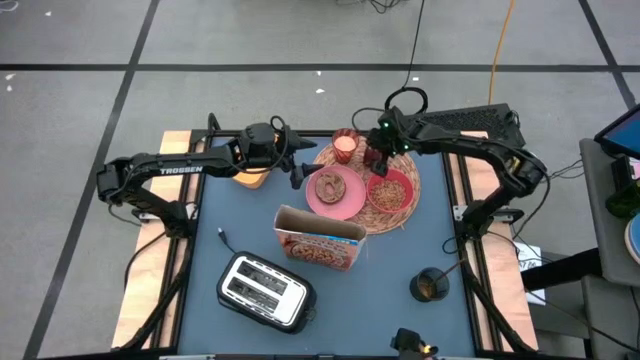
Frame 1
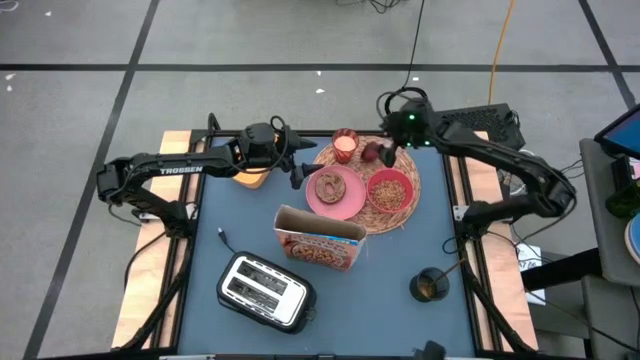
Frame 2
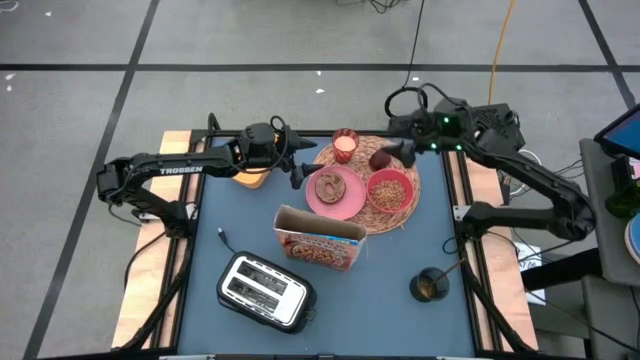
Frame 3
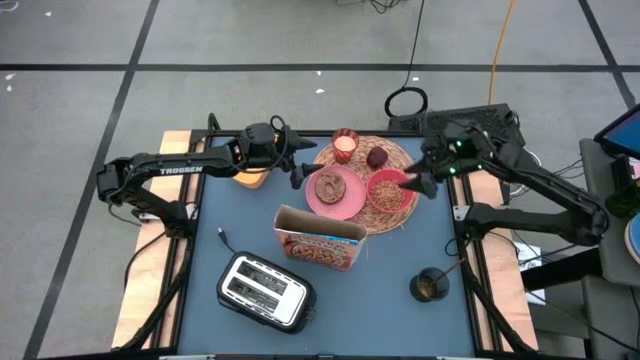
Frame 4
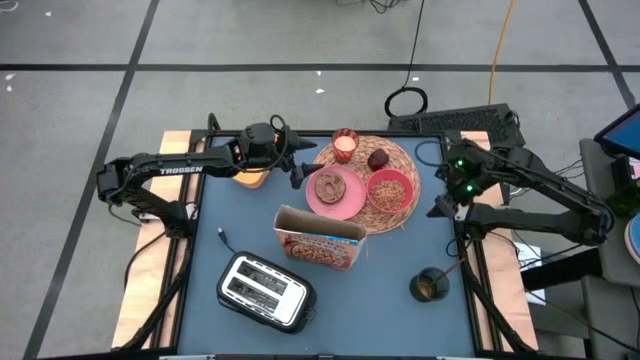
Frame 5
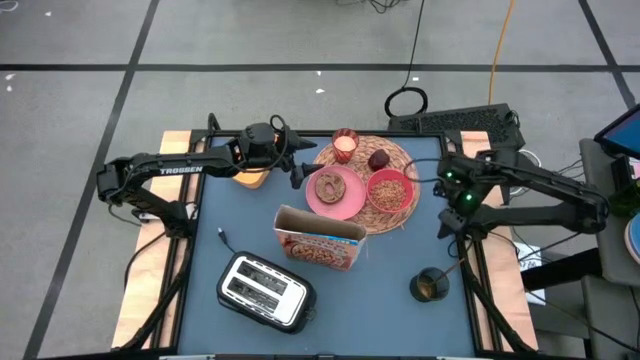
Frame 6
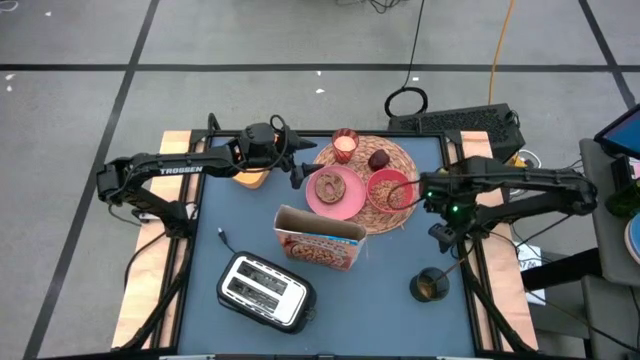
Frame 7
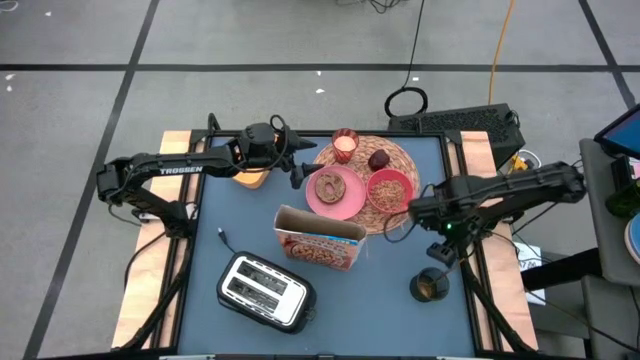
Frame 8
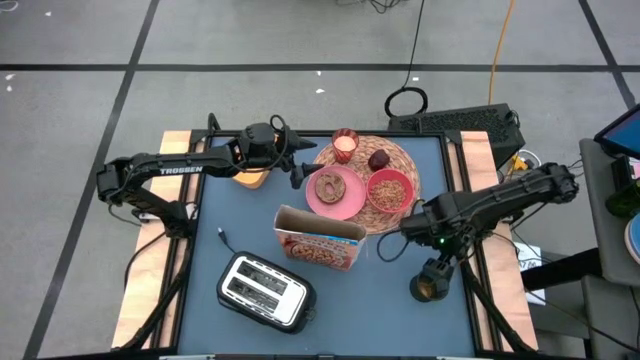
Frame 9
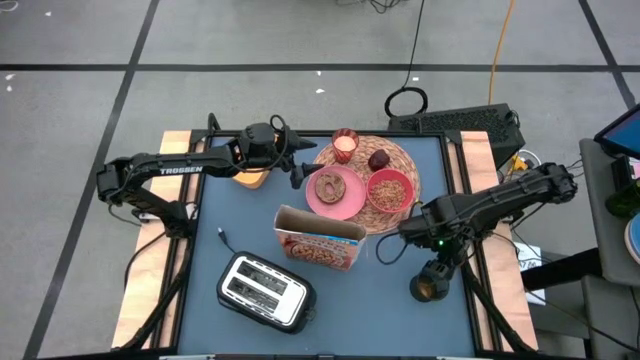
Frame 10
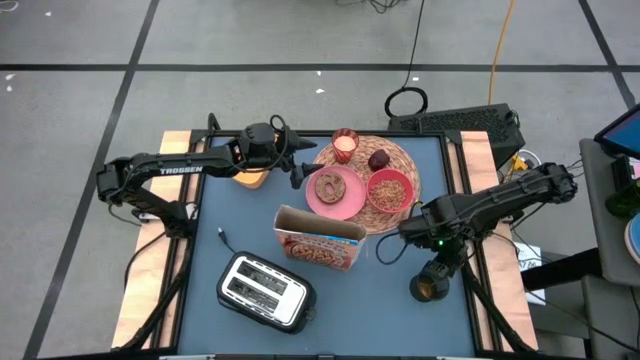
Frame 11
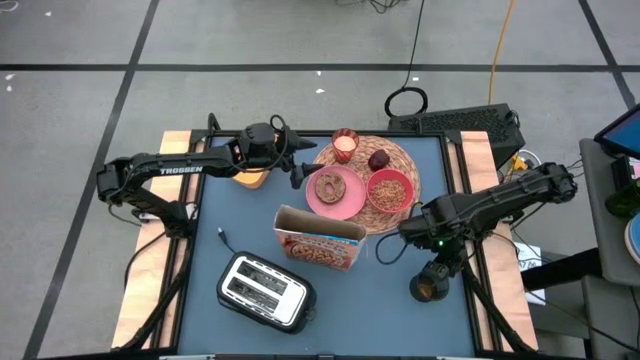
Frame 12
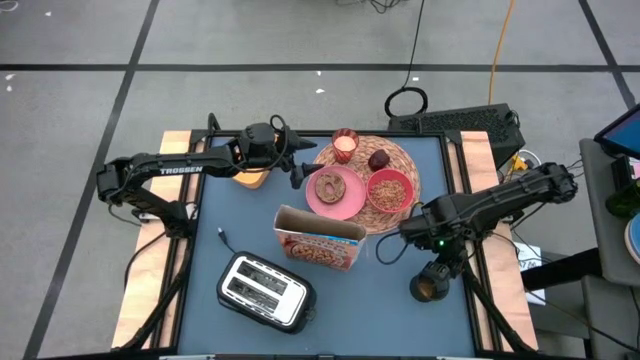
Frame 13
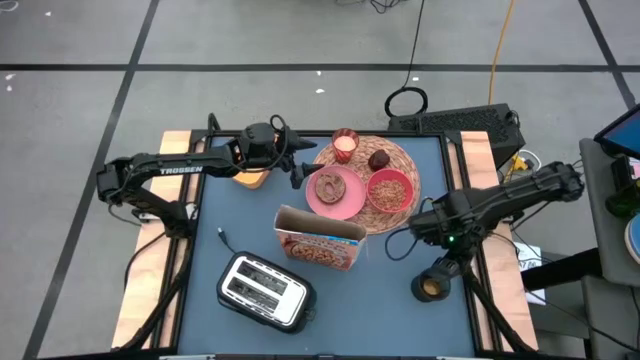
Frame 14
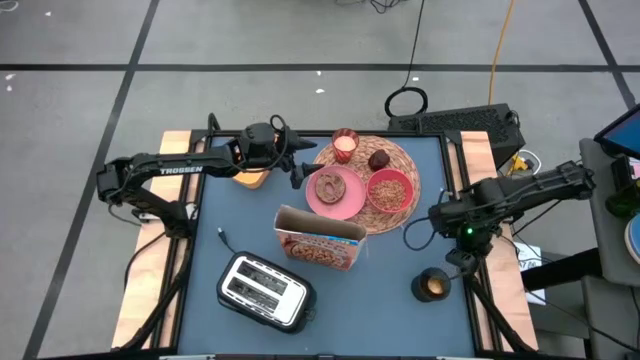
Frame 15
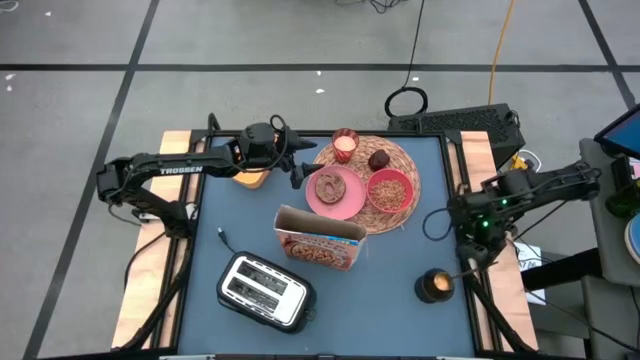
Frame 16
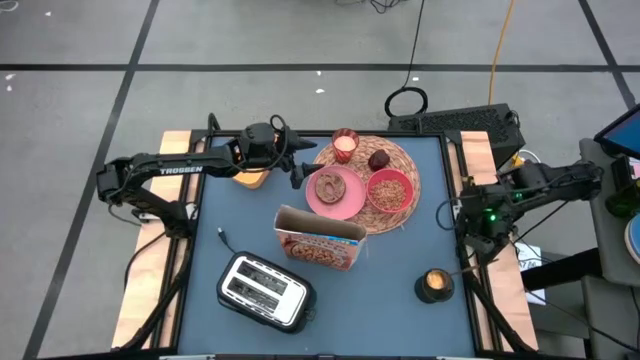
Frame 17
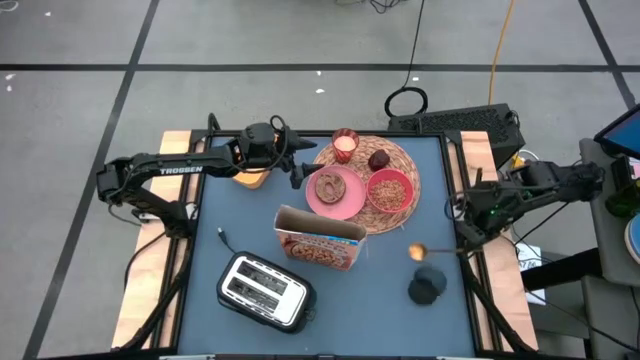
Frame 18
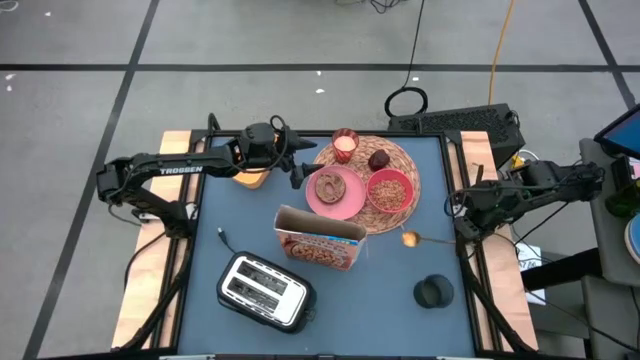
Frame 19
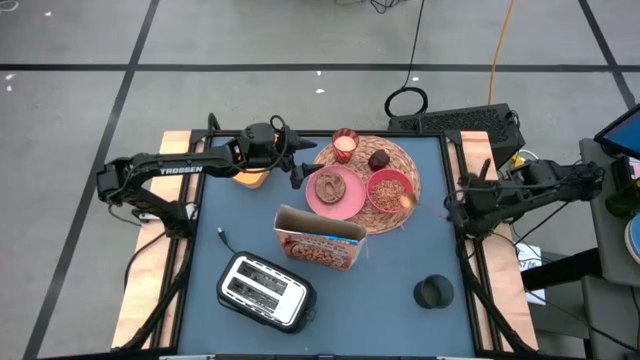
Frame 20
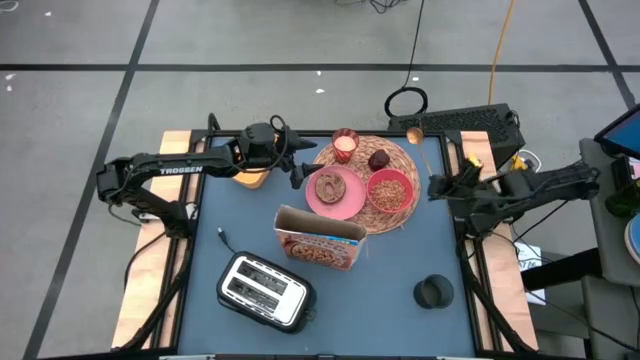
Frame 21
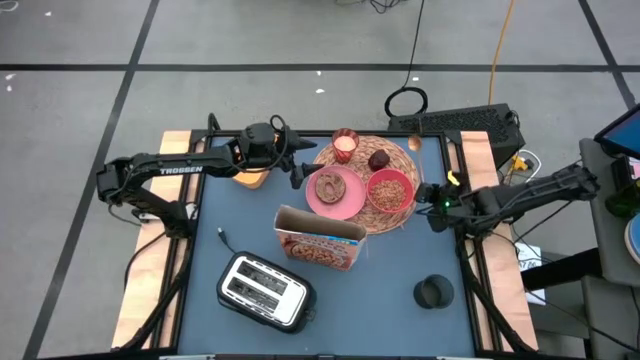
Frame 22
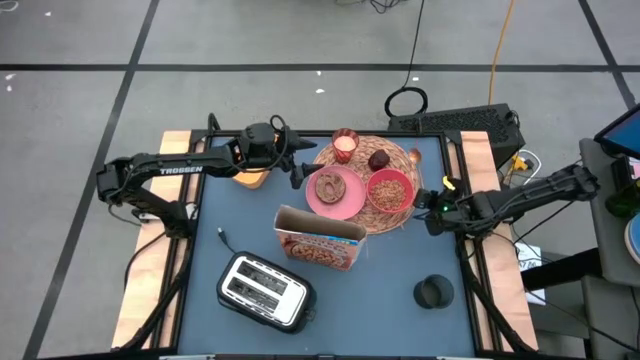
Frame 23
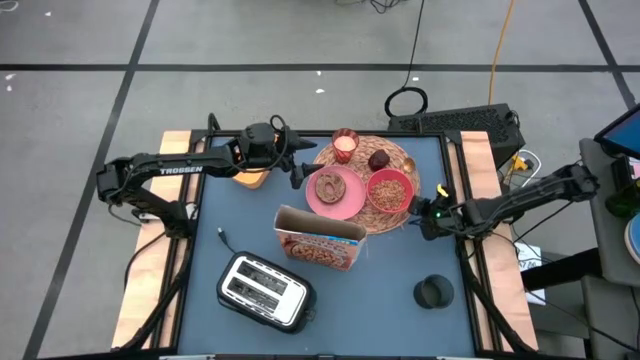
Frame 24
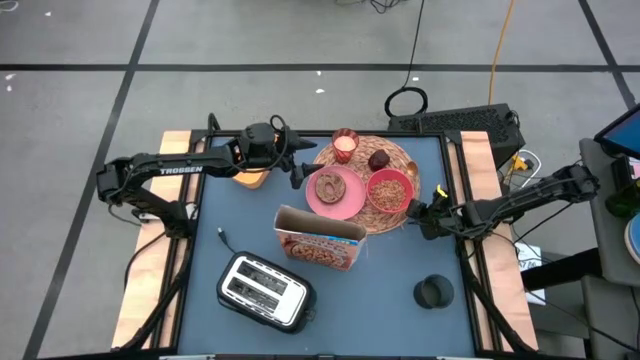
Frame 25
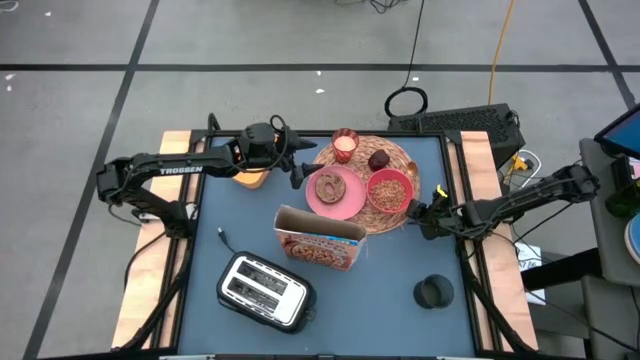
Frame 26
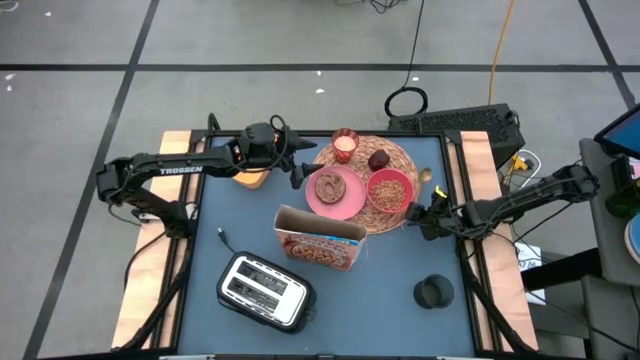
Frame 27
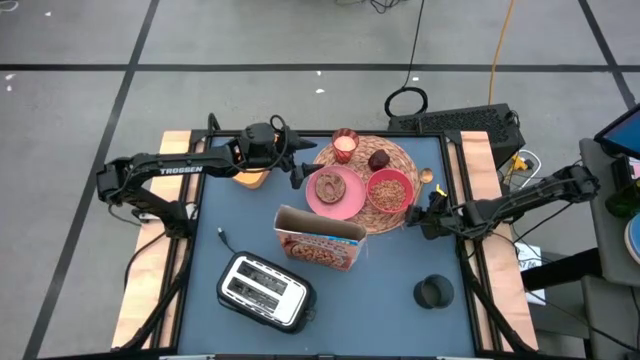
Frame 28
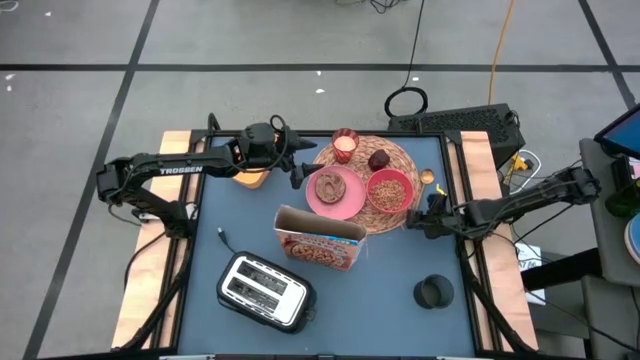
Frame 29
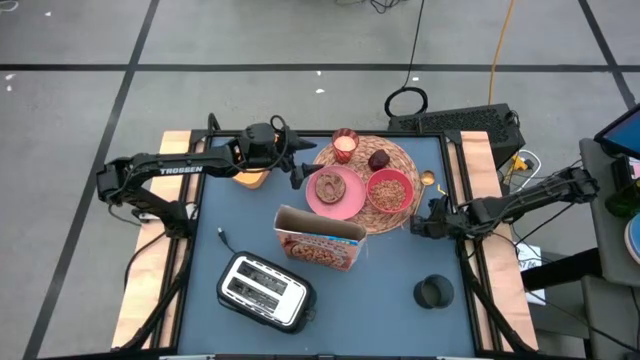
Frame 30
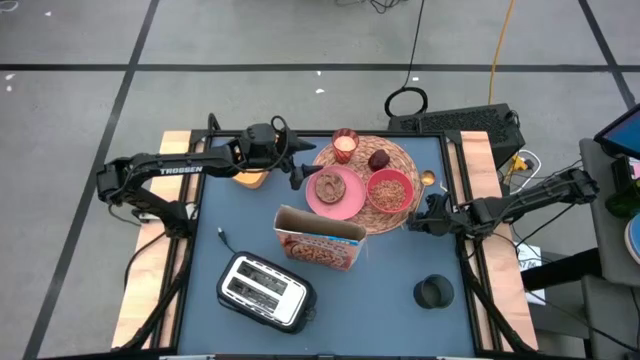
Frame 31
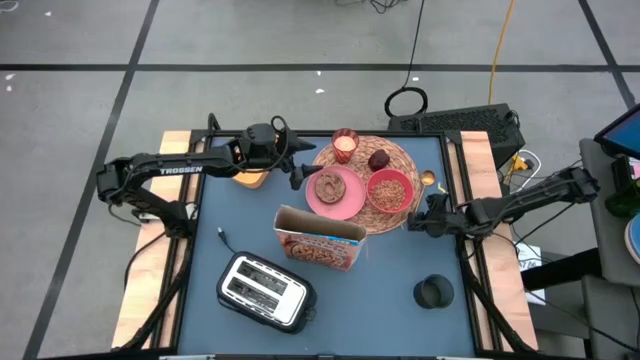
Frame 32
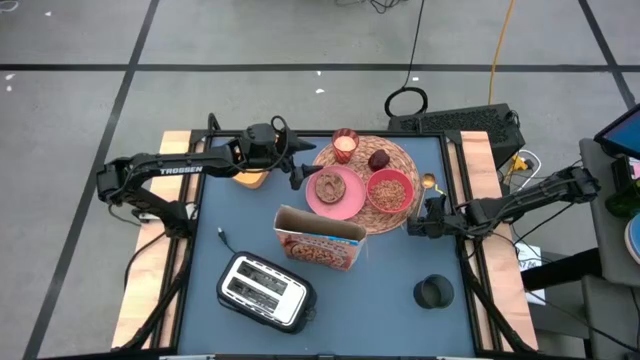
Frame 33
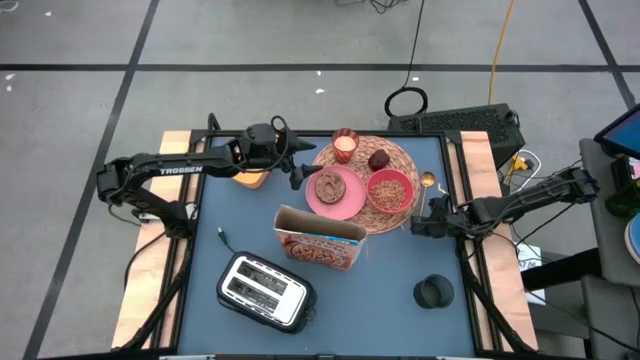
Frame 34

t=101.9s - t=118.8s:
Task: Arrange a breakfast setting
Put the spoon to the right of the tablemat

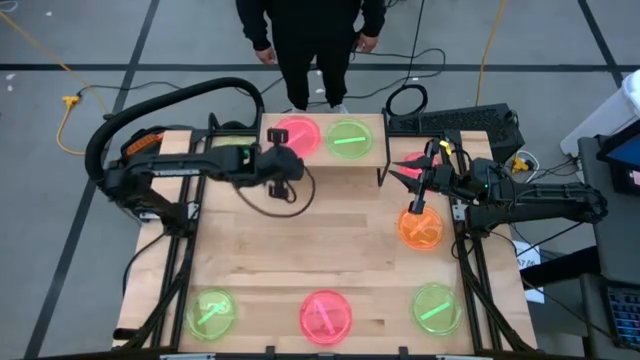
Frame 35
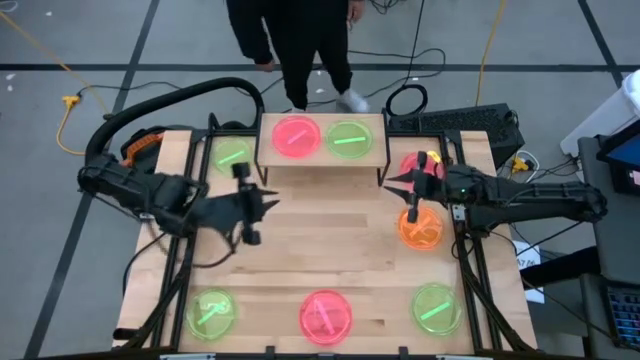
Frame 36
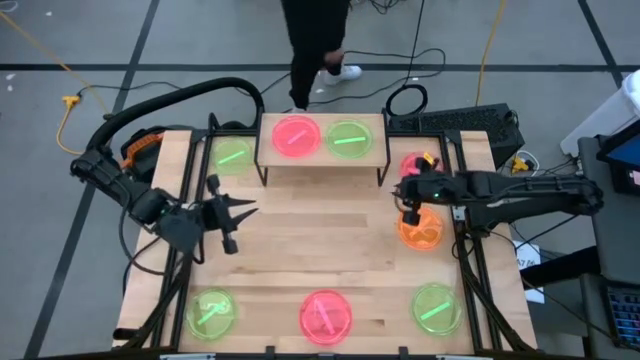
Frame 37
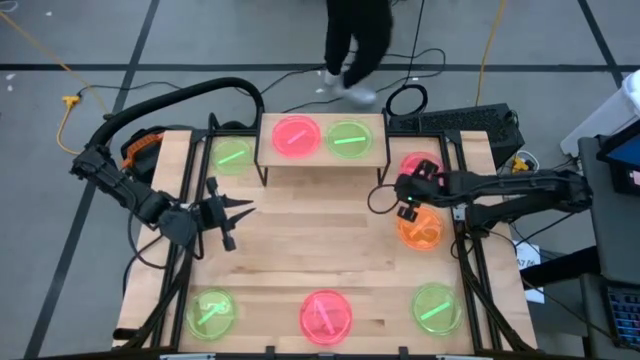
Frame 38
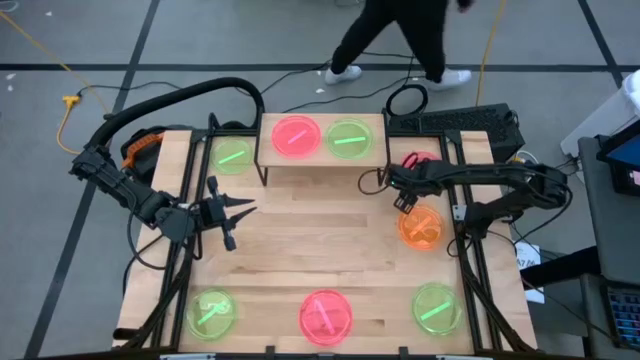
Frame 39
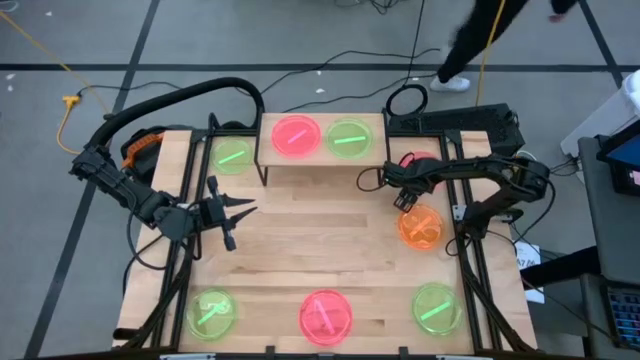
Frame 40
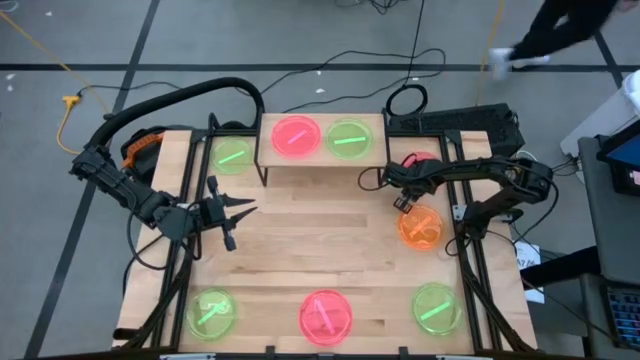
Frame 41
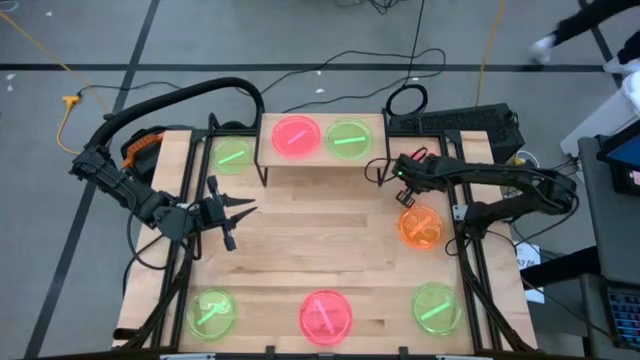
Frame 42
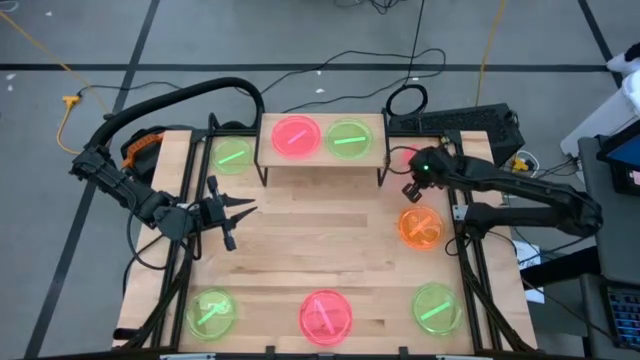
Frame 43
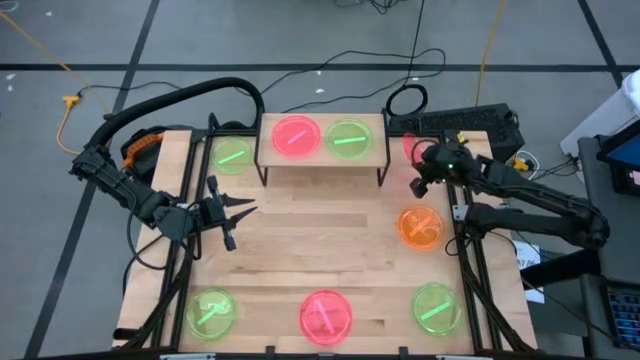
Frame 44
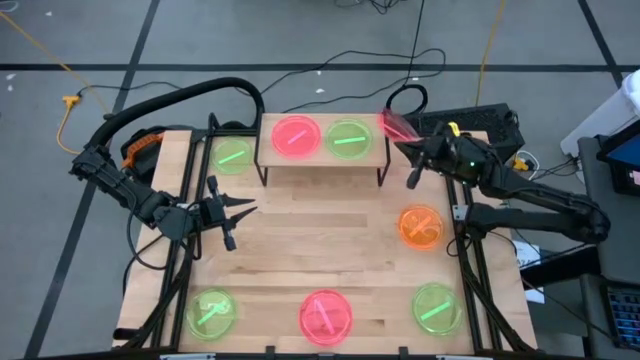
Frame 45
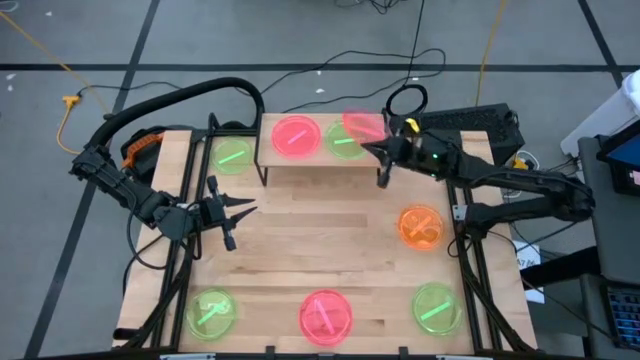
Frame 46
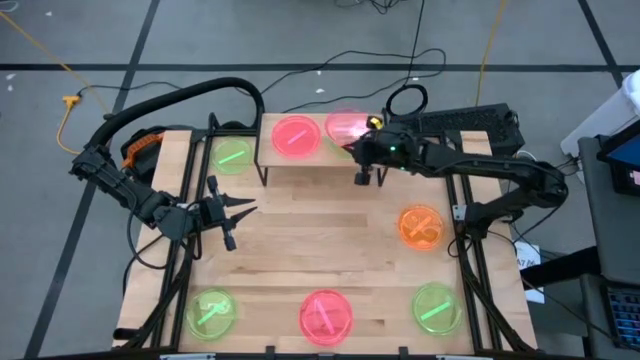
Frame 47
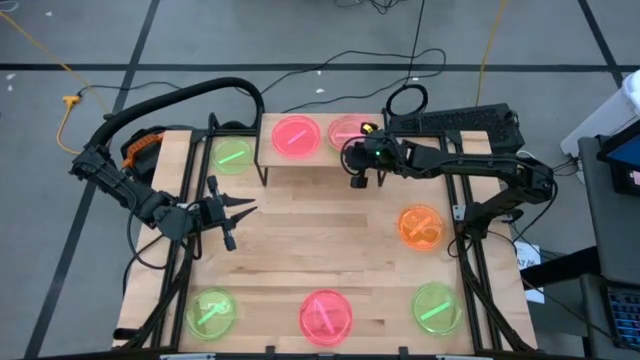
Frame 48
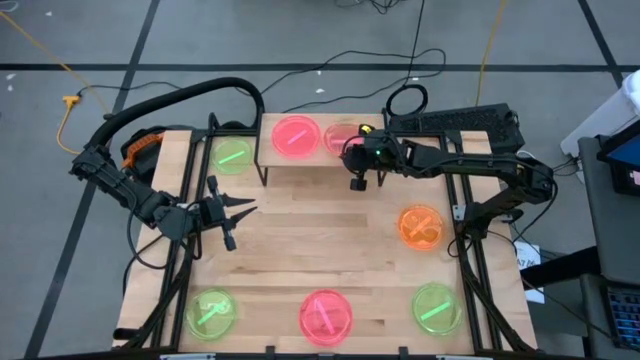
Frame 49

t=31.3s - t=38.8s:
Task: Place and stack plates onto a shelf
Stack the pink plate on top of the green plate on the shelf
